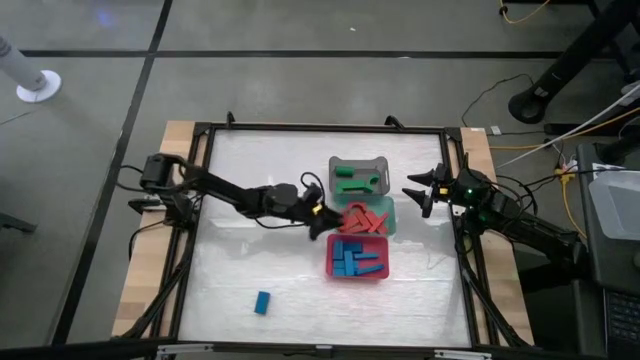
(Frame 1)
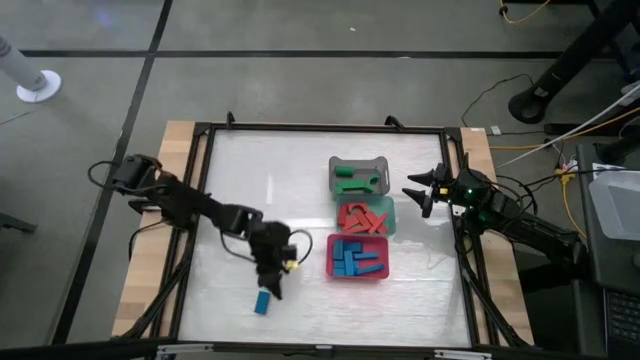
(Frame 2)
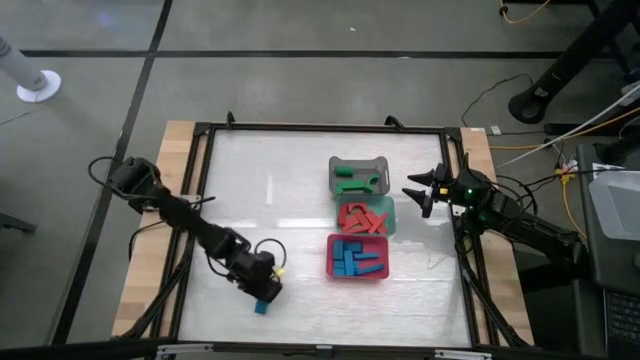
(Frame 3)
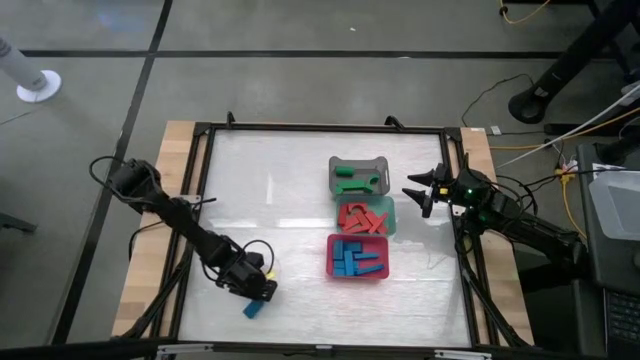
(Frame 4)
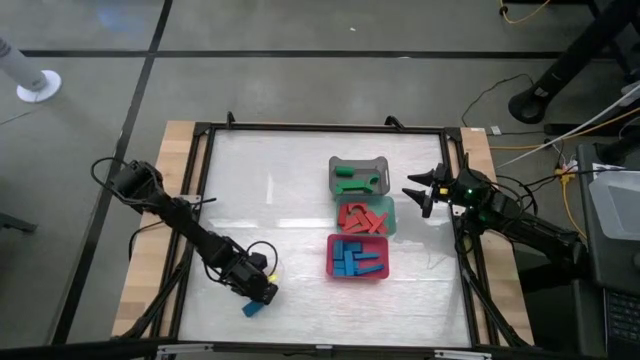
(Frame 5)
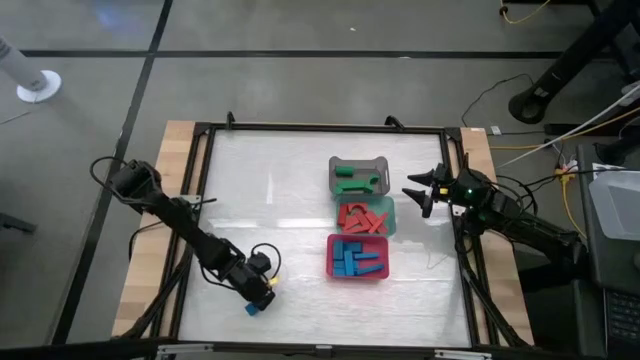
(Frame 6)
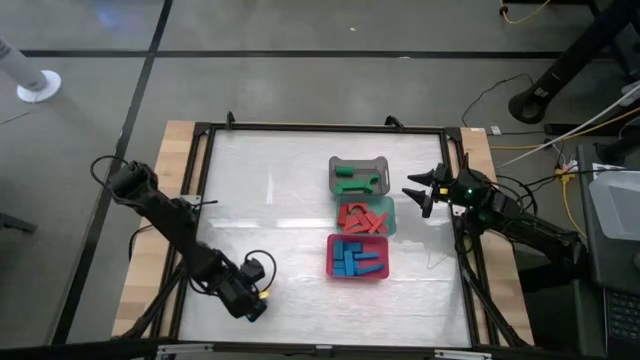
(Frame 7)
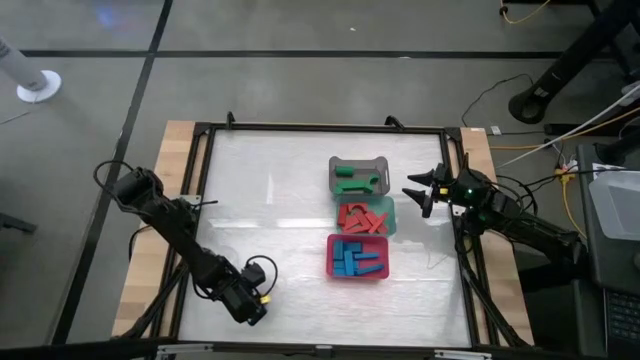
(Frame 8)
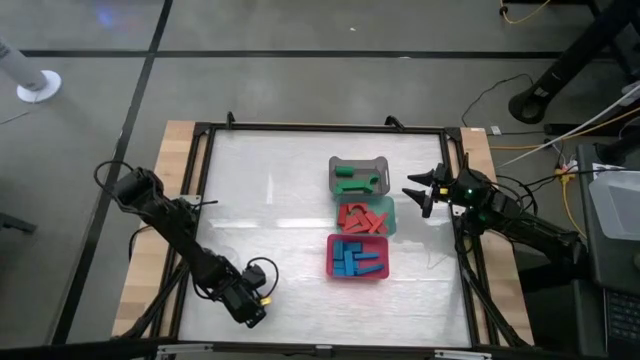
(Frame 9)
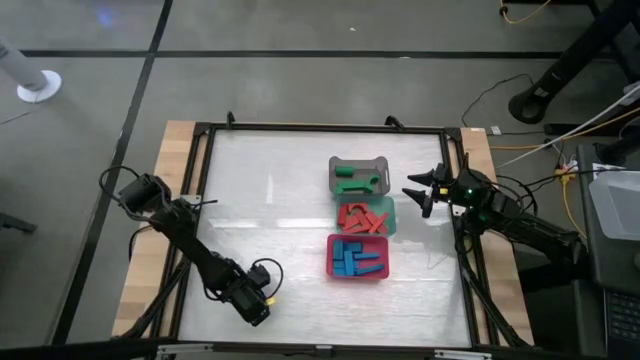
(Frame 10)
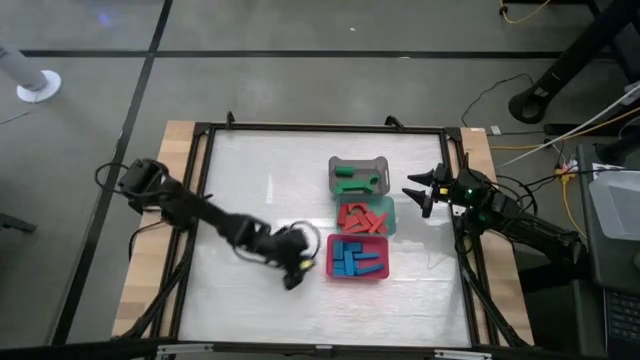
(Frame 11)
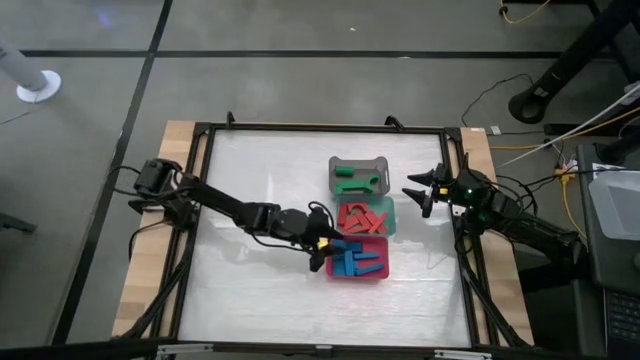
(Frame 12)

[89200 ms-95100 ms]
Task: Sort blocks
Put the blue block into the red bin

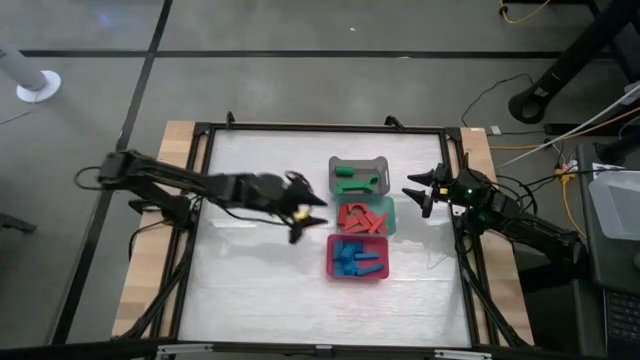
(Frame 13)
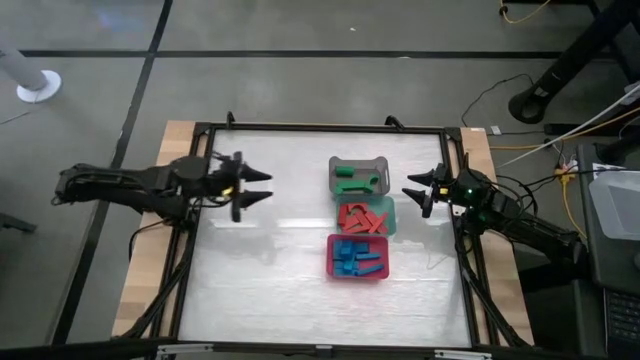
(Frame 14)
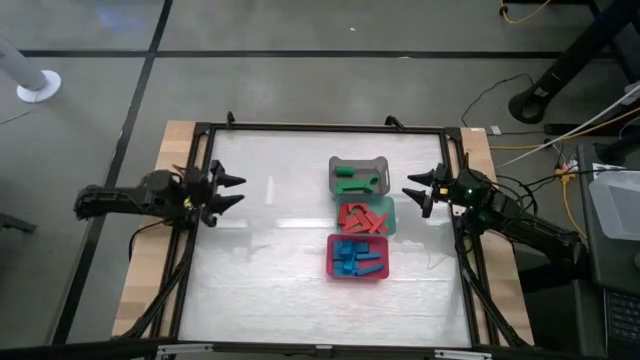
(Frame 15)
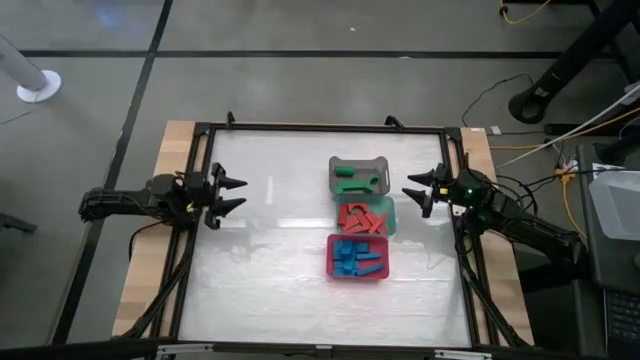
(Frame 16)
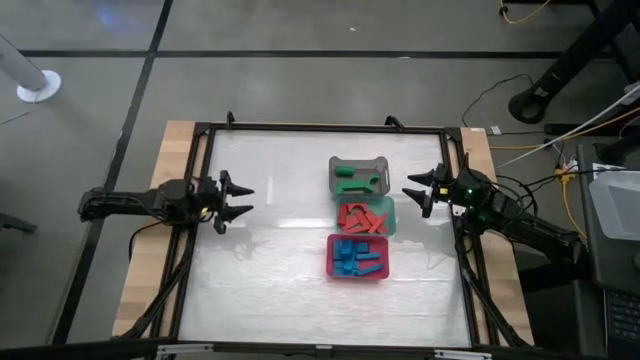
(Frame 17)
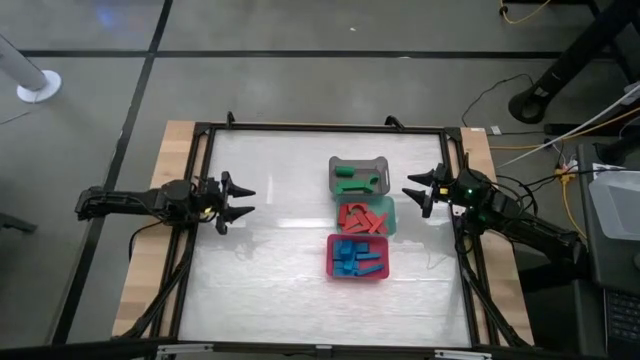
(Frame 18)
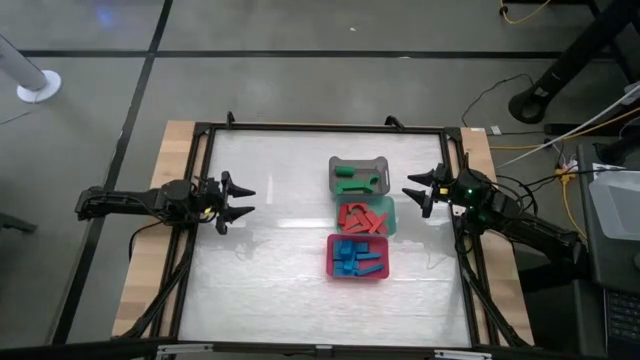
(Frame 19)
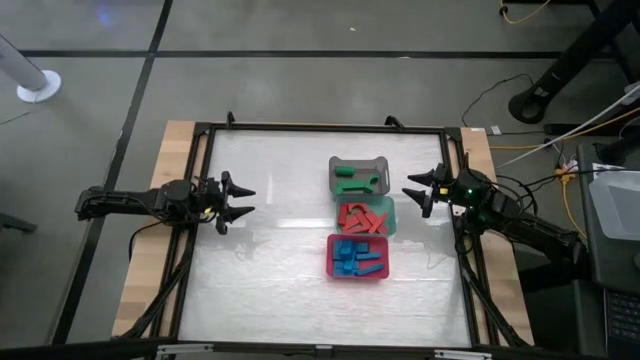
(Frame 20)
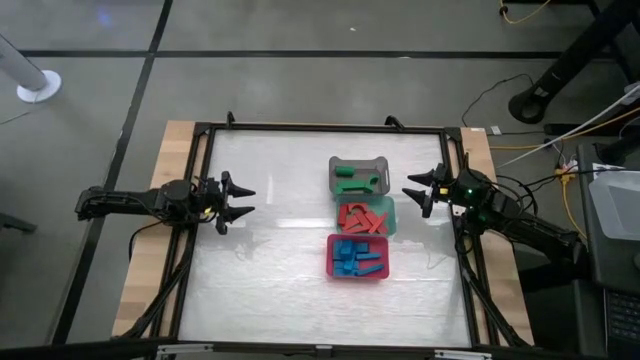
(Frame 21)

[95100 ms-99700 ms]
Return to home position

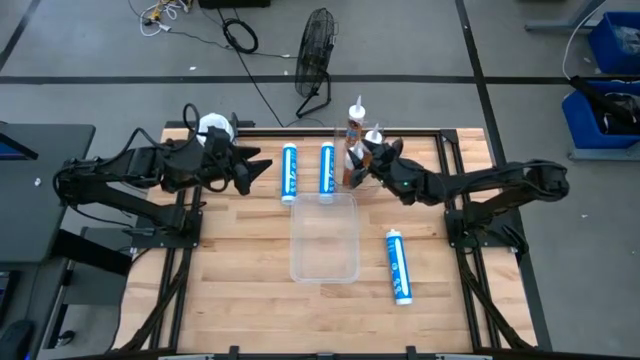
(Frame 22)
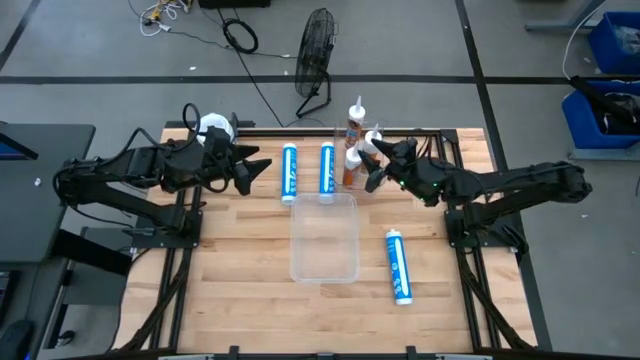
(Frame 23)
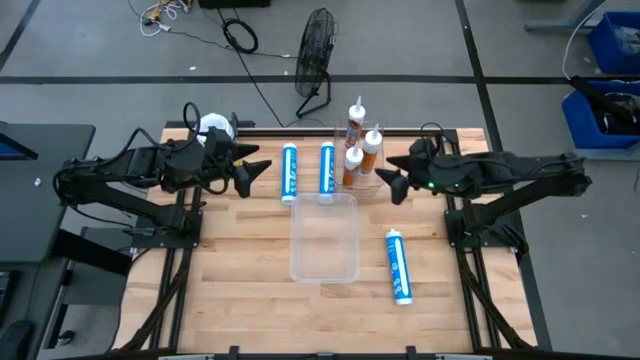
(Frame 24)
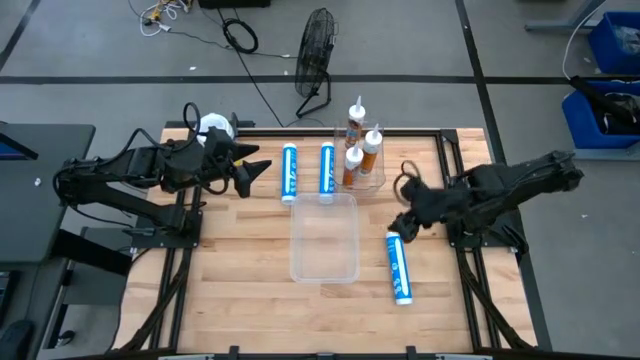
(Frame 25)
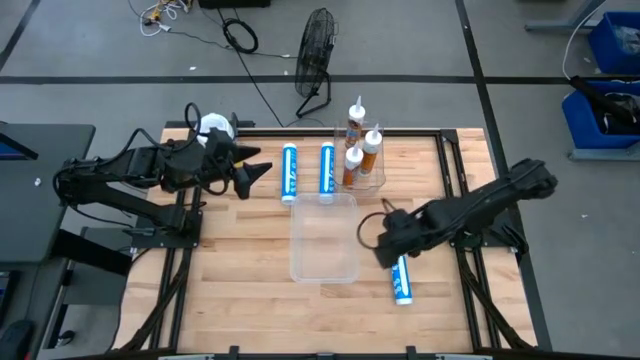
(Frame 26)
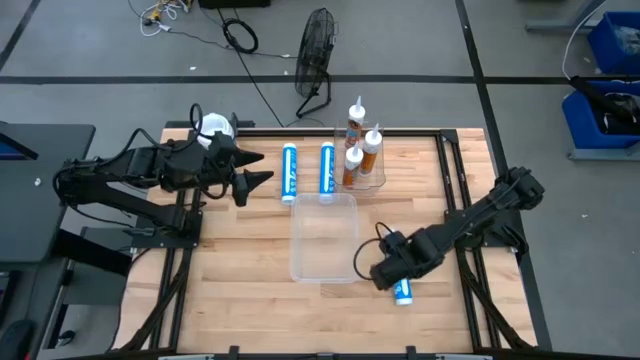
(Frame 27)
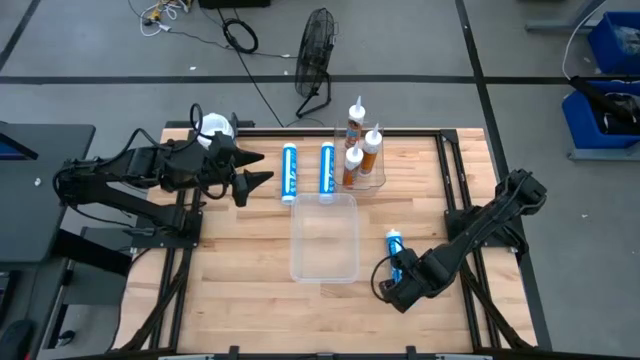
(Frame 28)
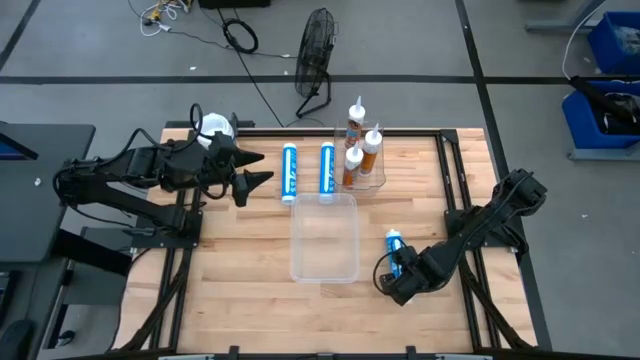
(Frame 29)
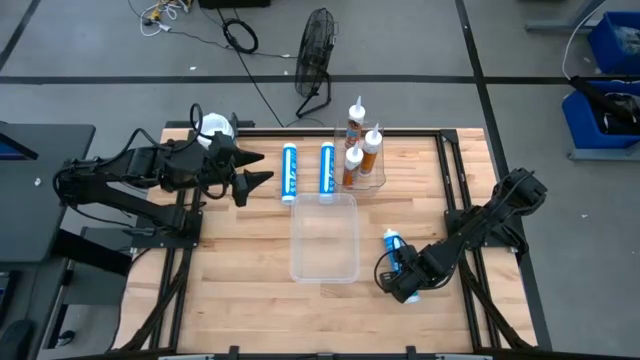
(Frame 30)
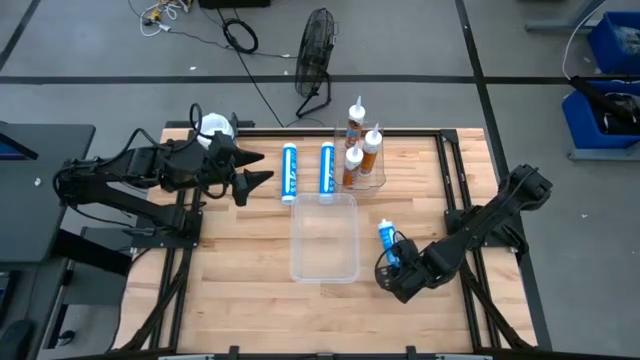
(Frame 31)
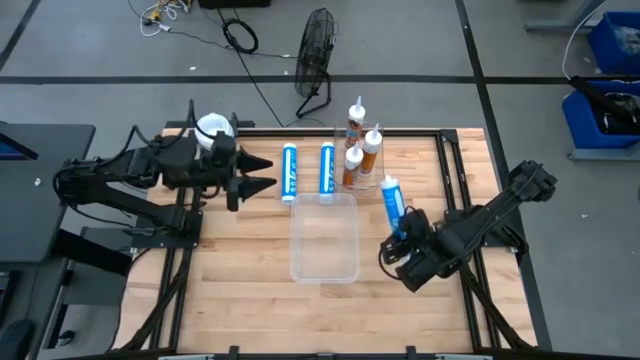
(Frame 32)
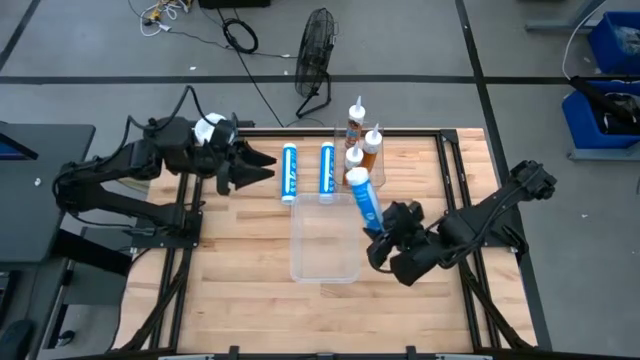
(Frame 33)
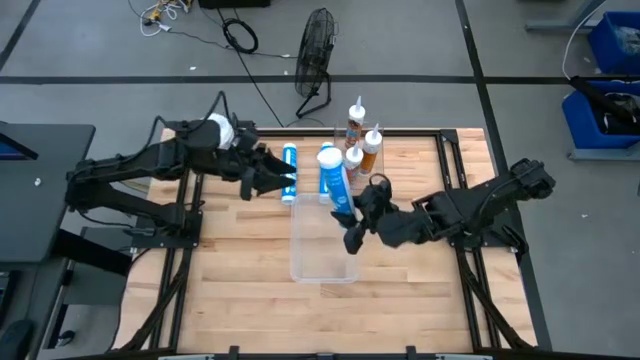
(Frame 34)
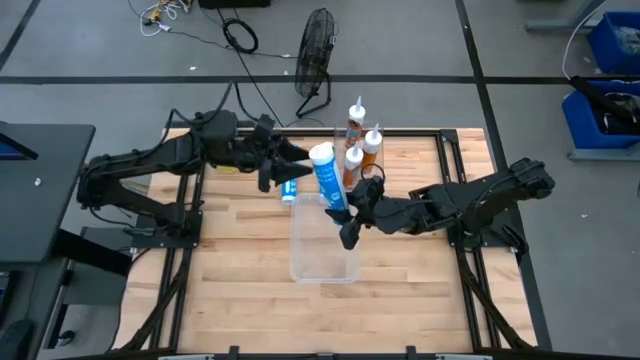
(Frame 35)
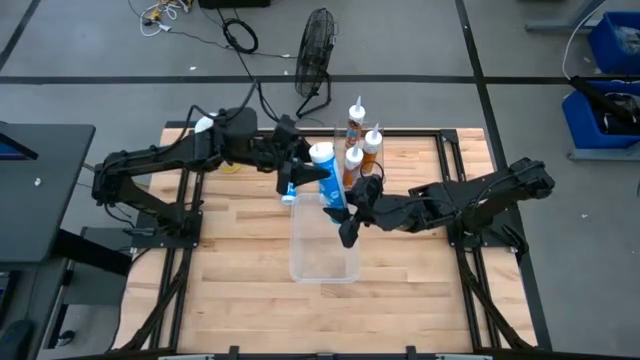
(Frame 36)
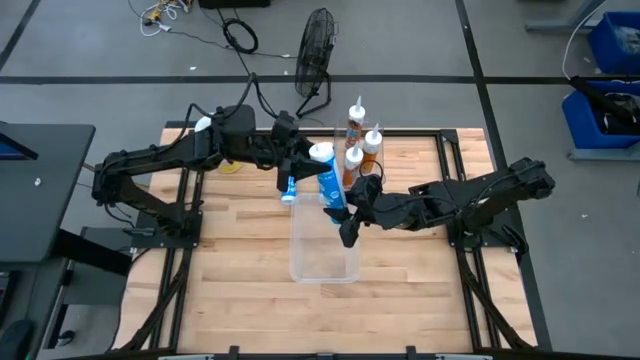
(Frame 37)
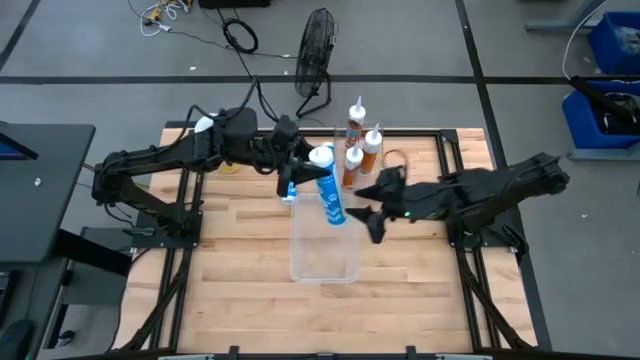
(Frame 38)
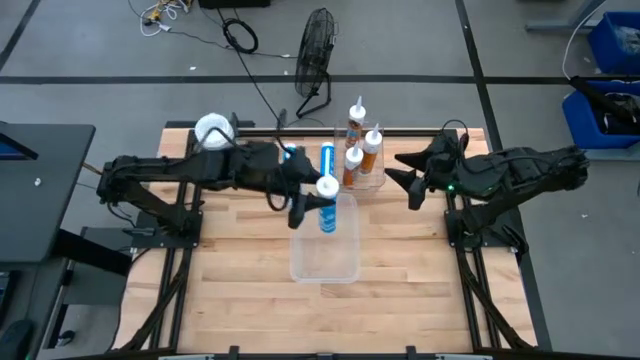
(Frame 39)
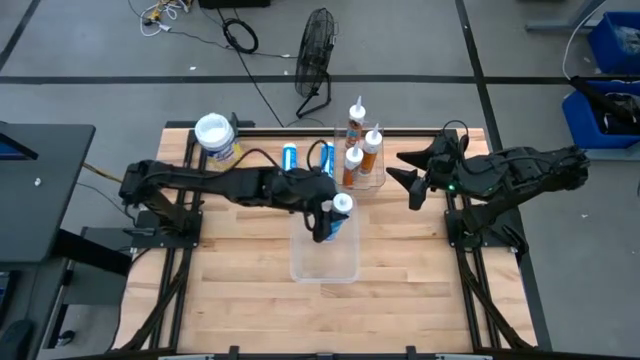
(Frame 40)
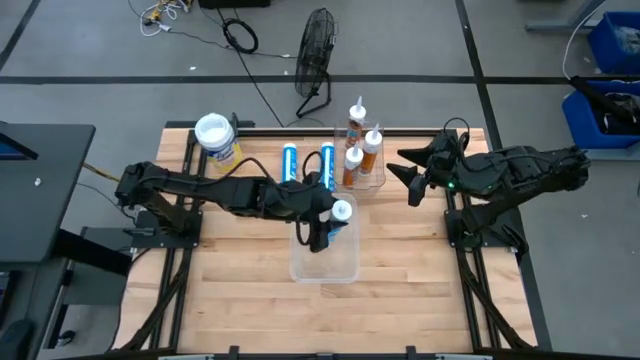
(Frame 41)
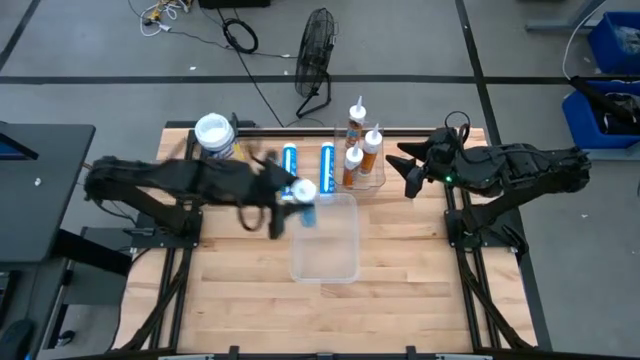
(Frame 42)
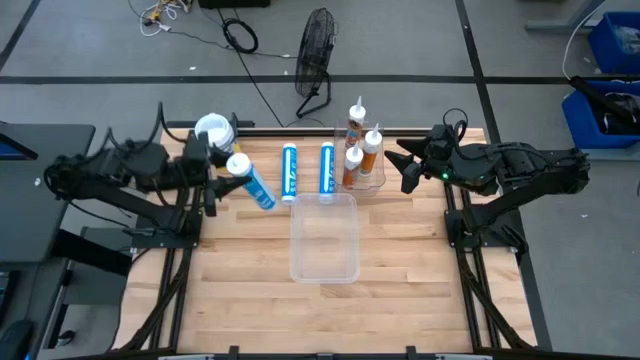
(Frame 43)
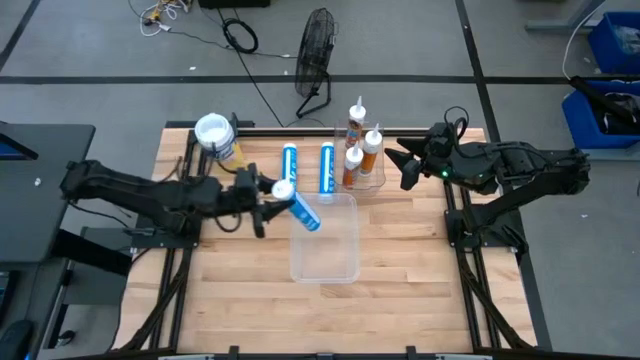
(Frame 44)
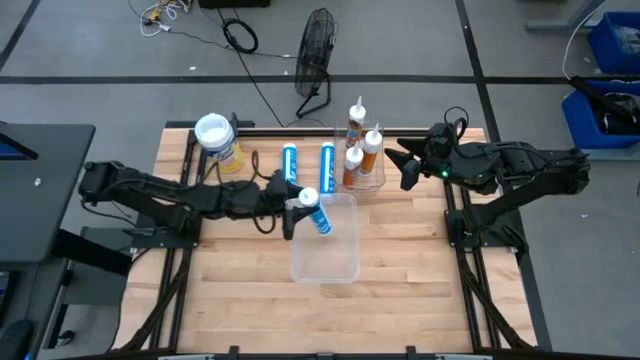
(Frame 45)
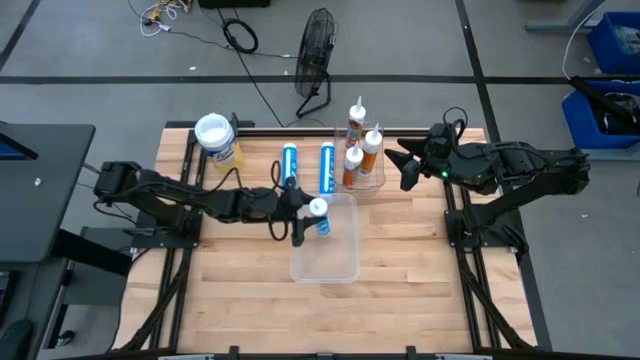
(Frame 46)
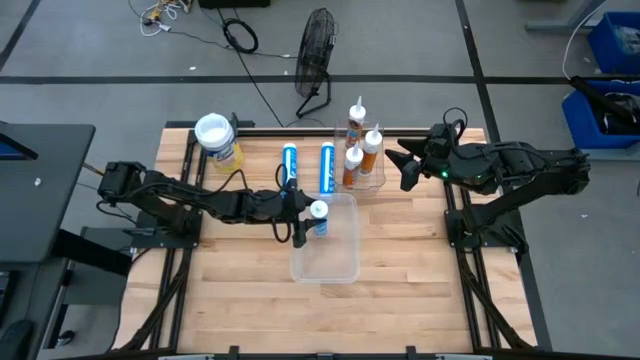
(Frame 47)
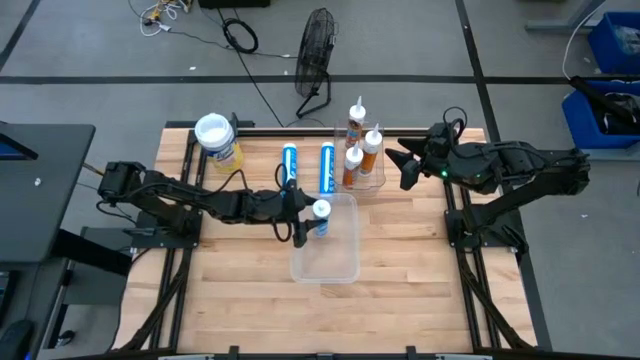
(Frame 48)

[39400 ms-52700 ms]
Task: Sort silicone sealant tubes
Put the bottom right blue sealant into the bottom transparent bin
